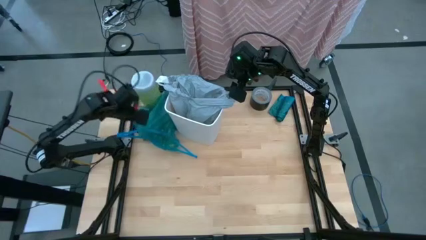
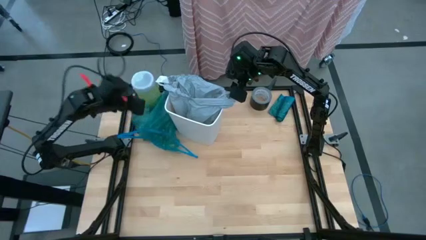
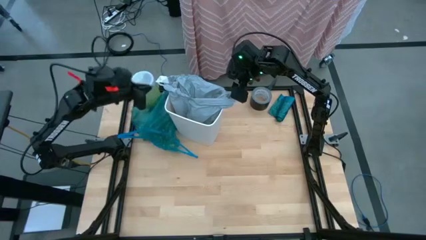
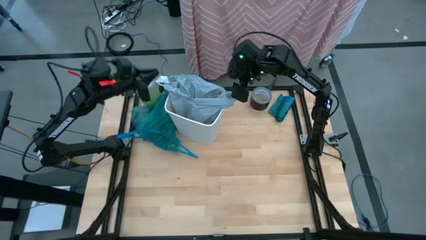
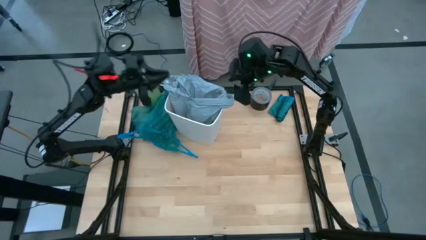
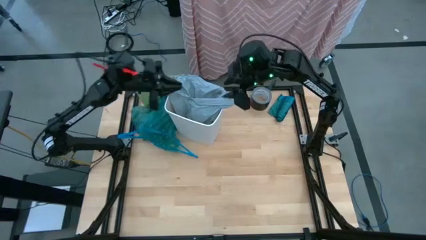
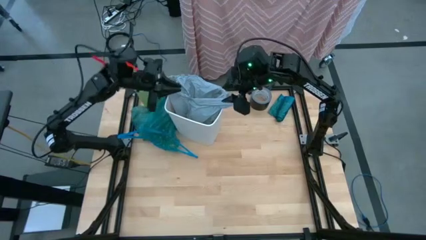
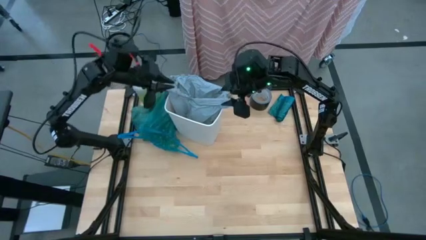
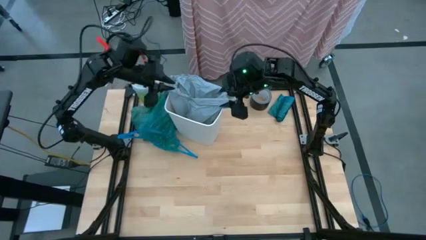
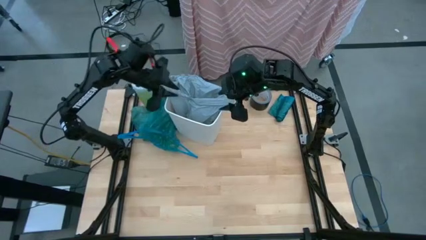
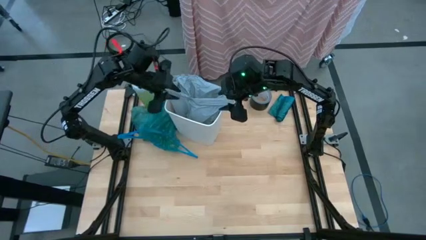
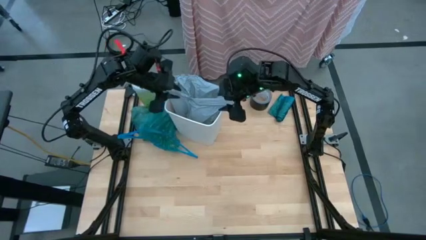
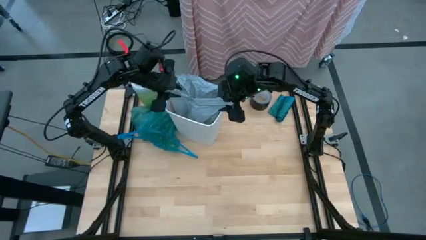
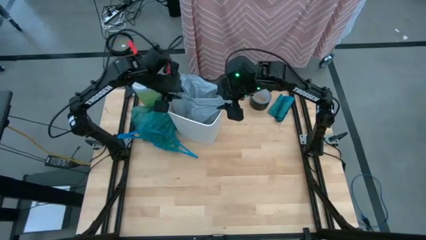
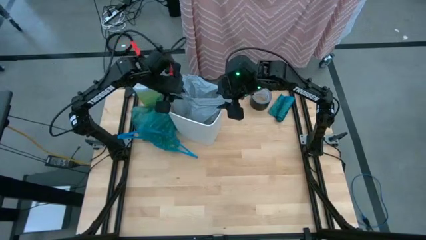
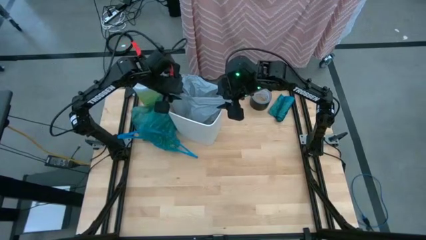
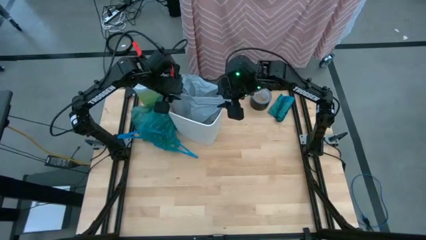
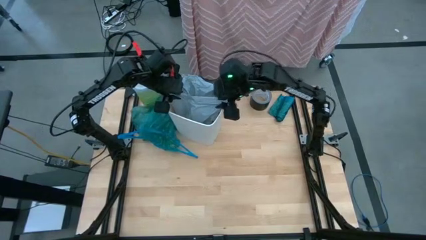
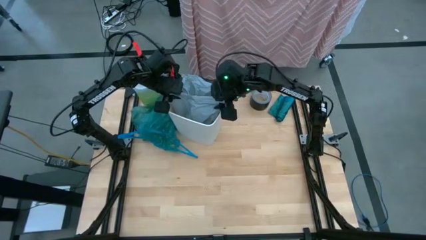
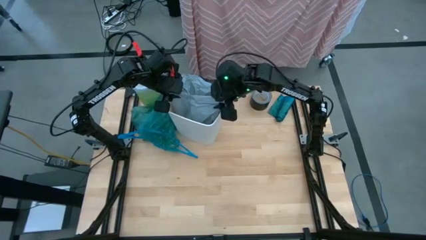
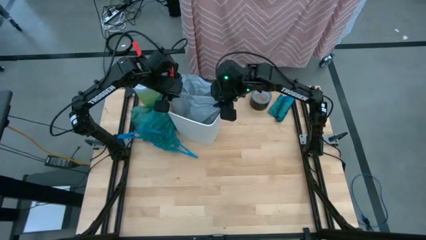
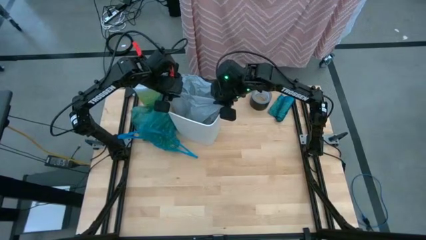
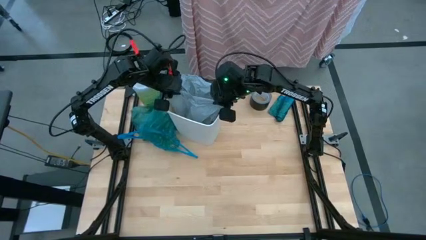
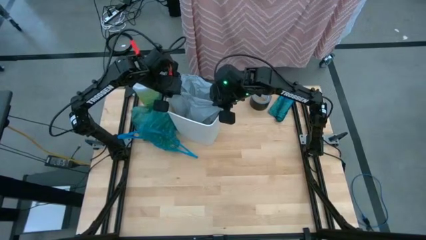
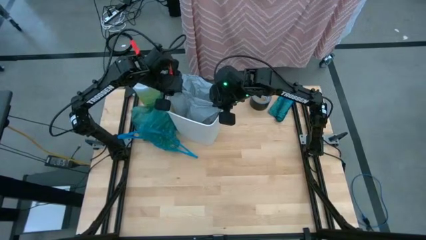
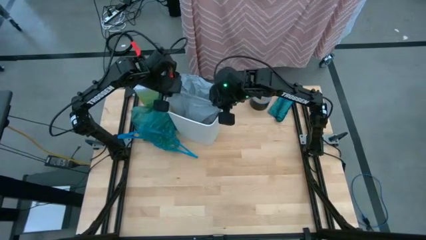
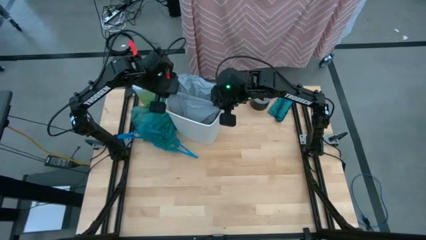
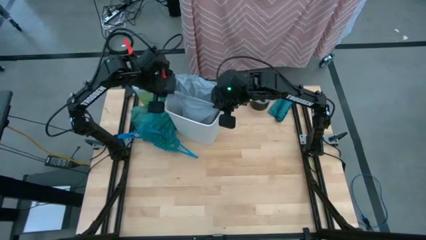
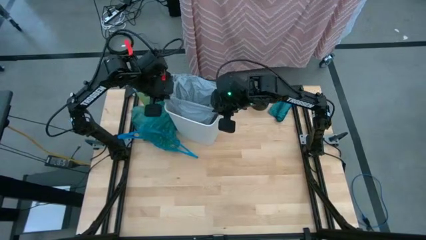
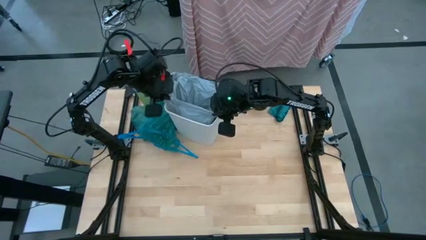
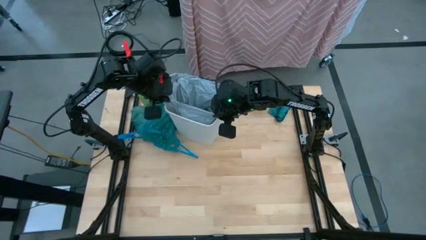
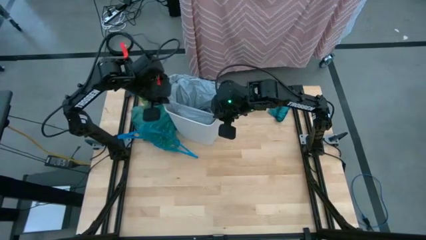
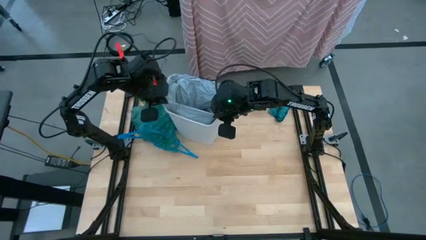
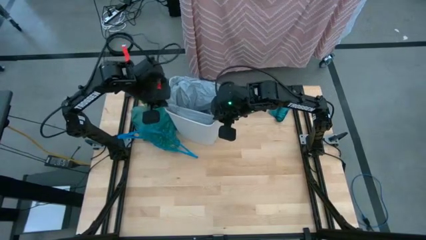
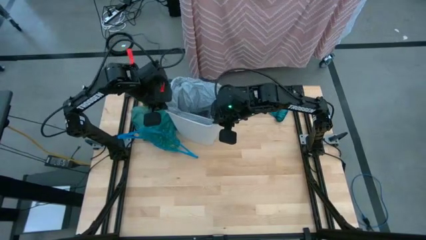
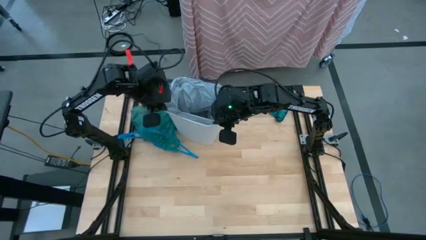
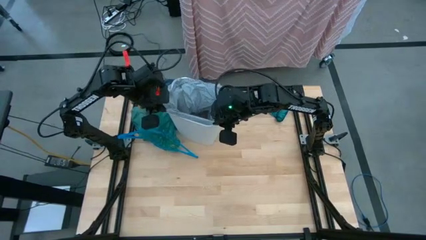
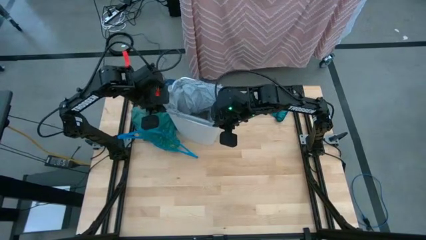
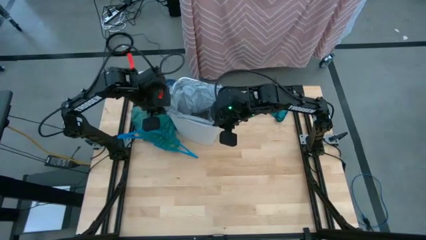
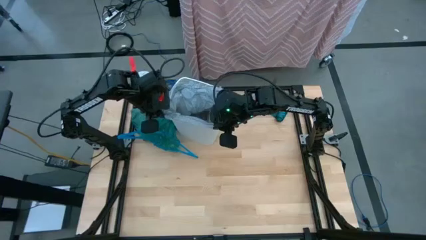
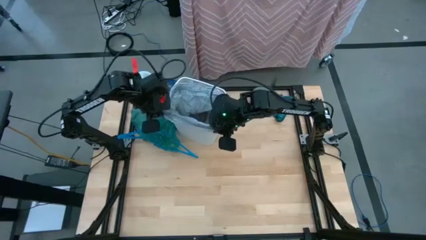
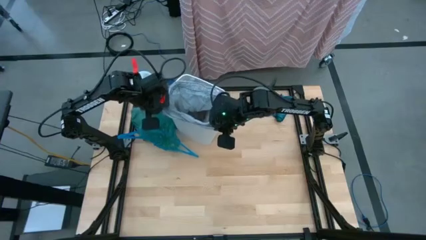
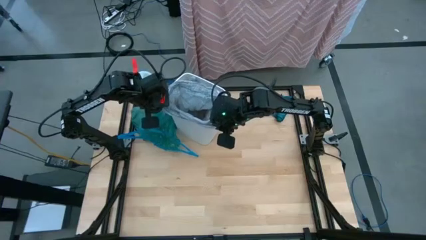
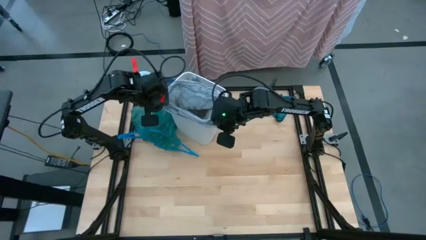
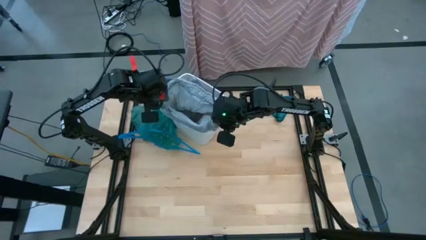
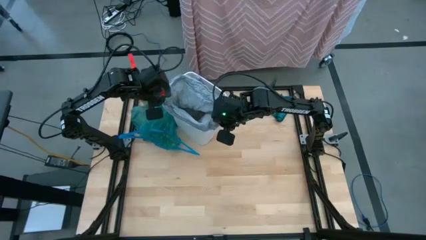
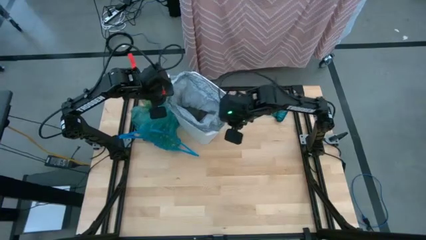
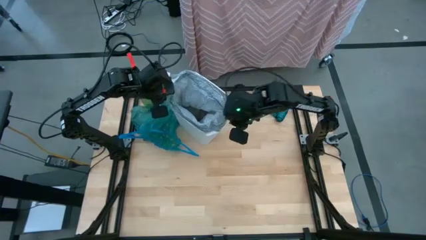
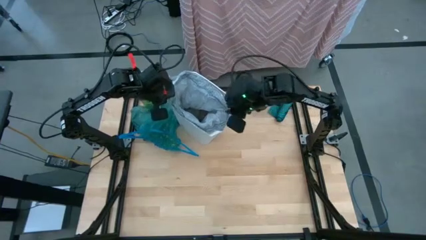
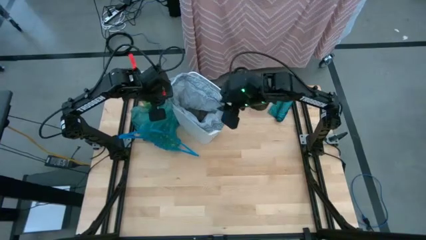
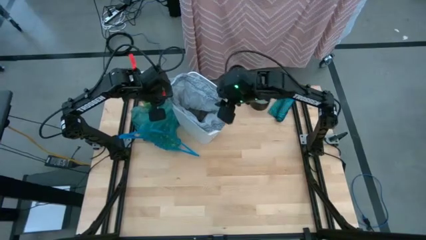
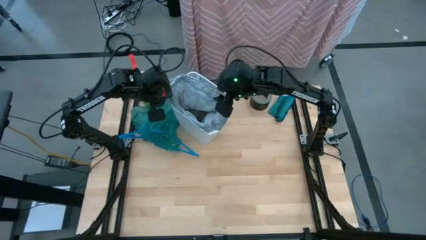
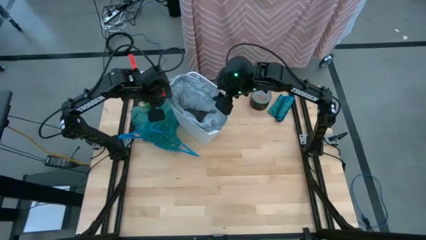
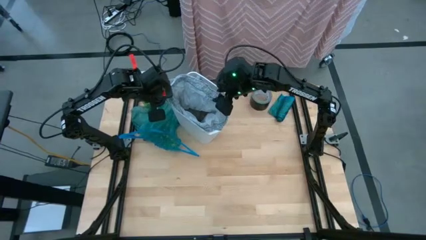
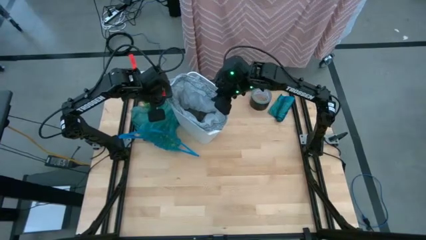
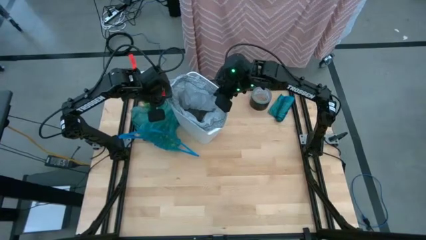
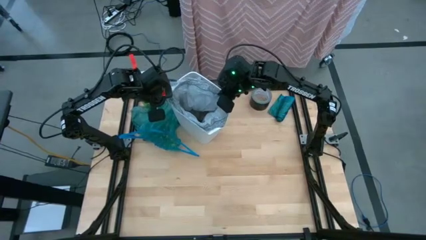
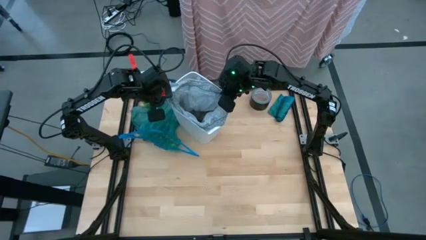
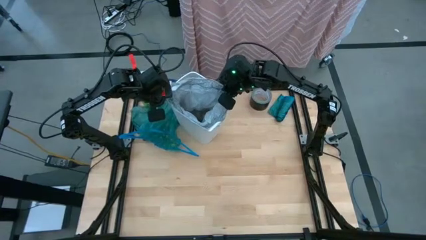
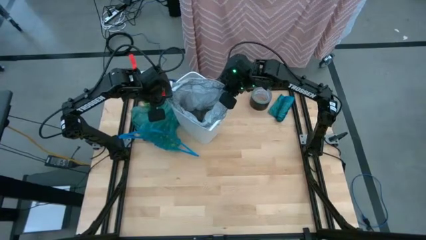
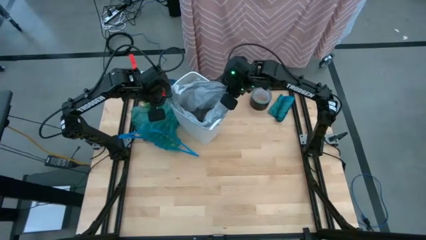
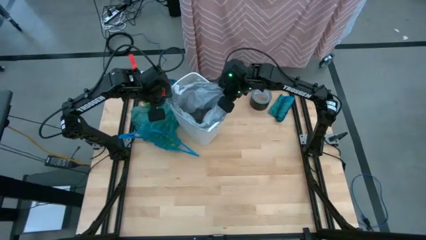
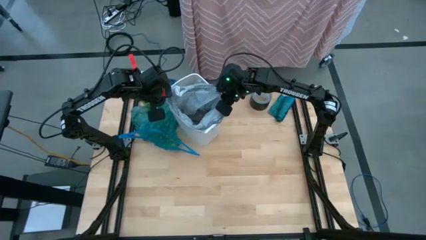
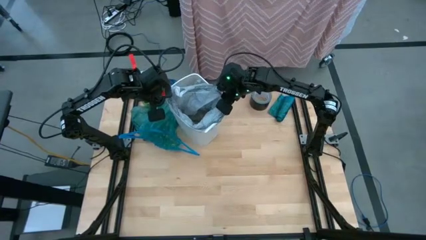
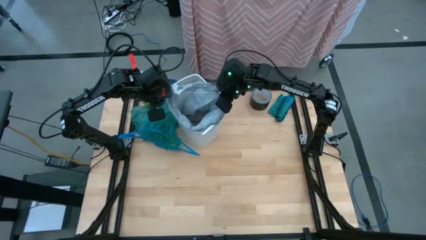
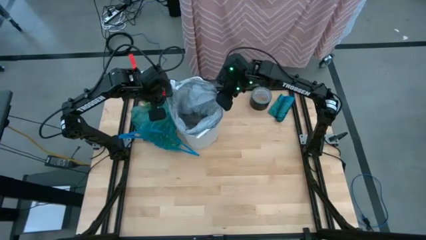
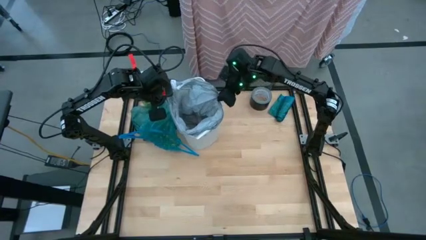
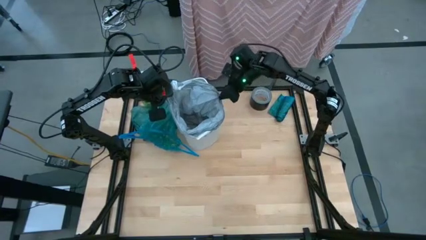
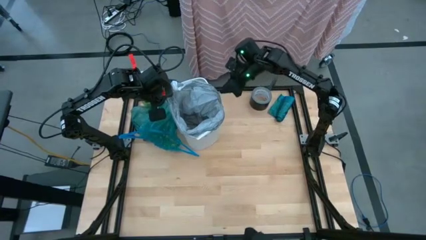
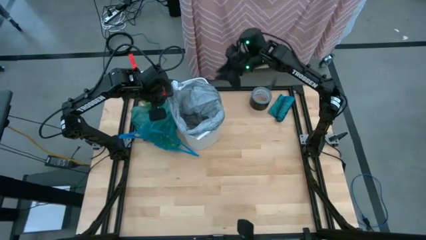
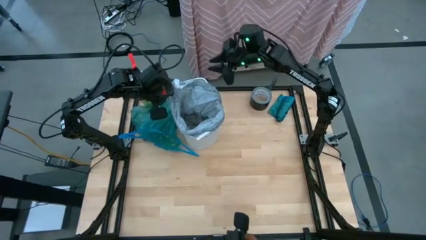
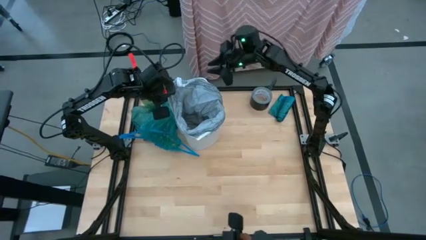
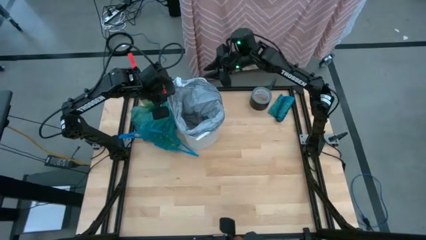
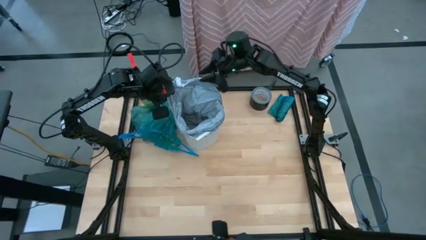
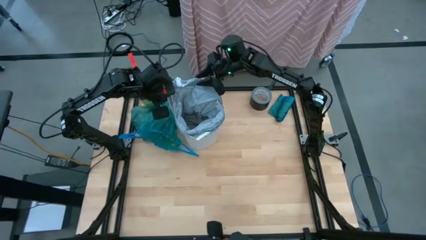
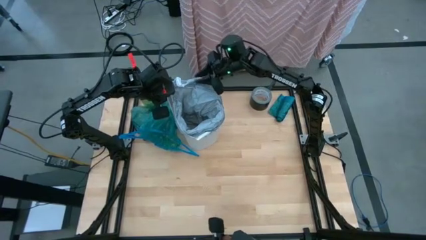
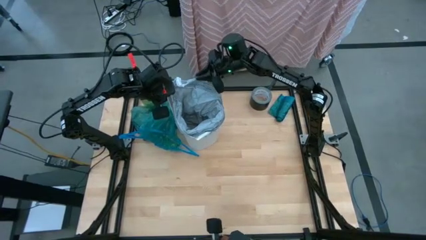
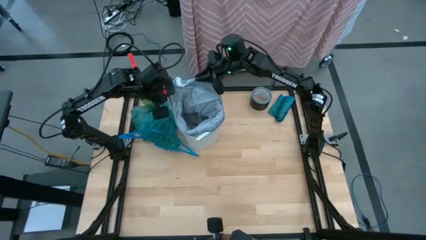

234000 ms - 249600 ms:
Task: place trash/remove bag and relplace
Insert the gray trash bag into the trash bin
